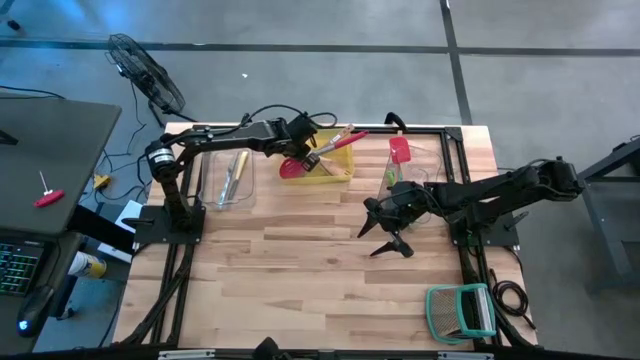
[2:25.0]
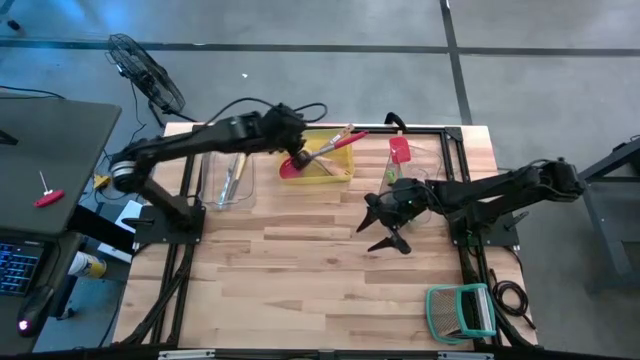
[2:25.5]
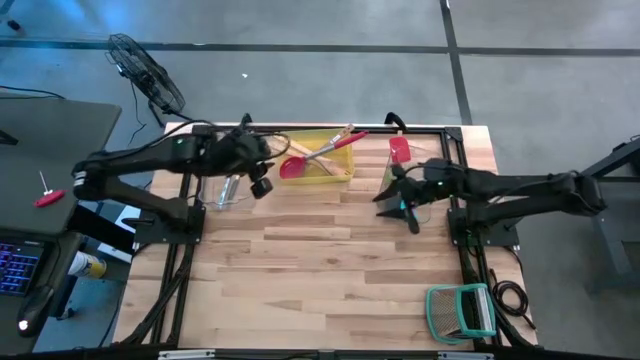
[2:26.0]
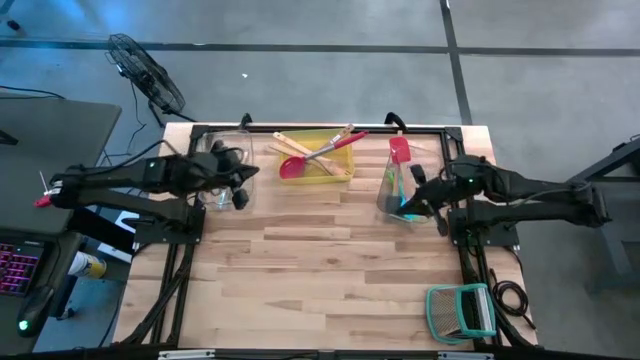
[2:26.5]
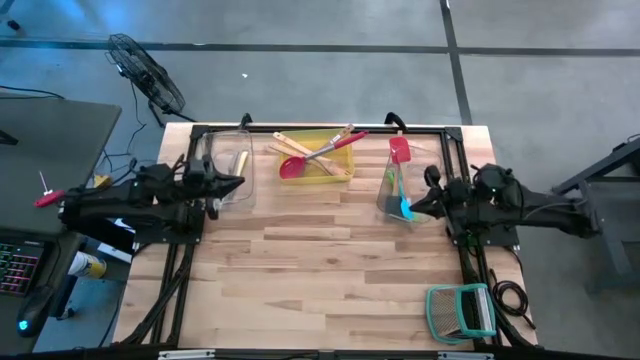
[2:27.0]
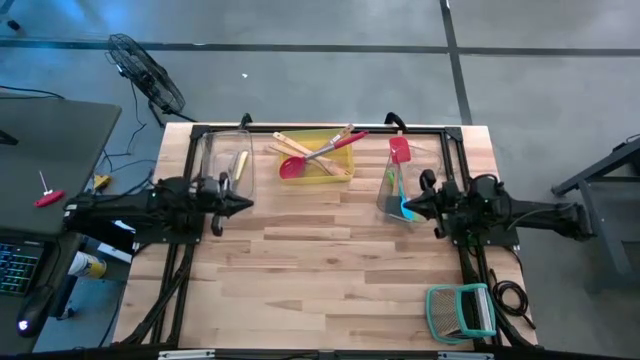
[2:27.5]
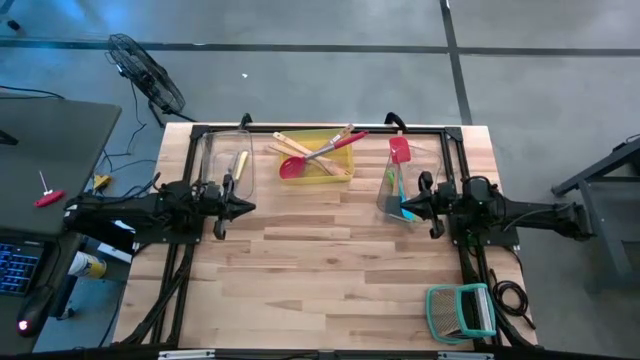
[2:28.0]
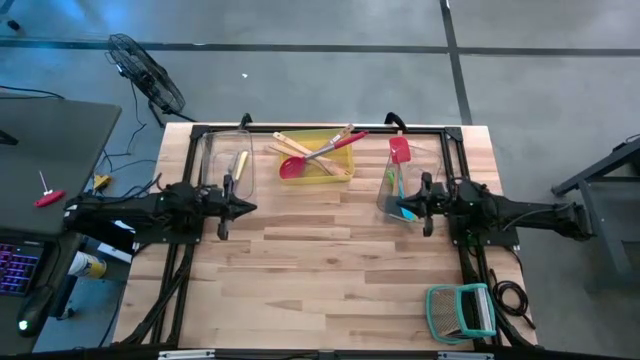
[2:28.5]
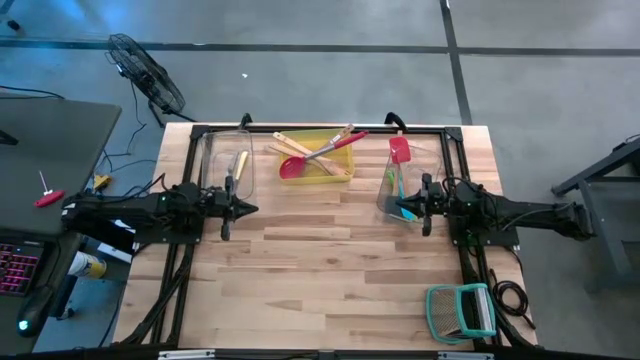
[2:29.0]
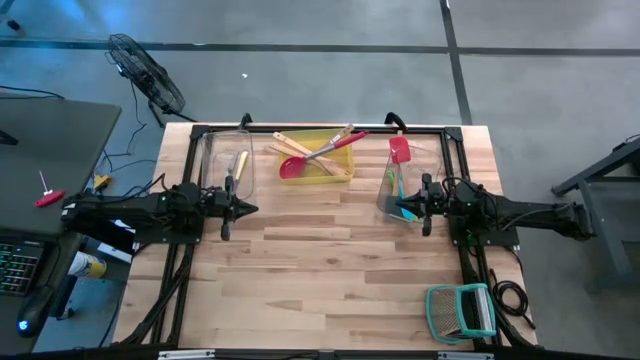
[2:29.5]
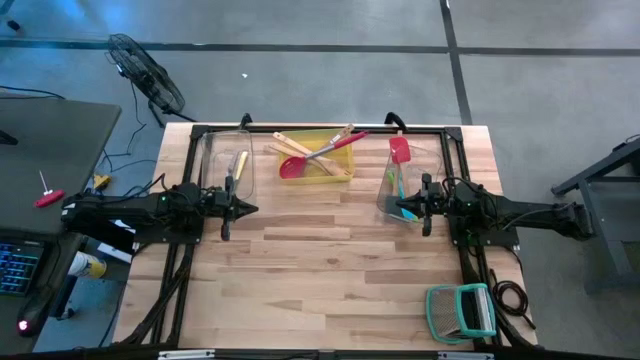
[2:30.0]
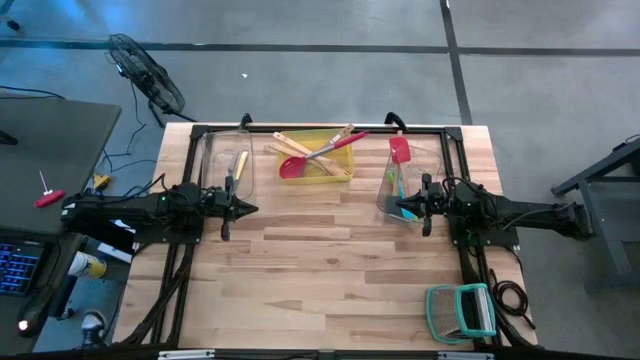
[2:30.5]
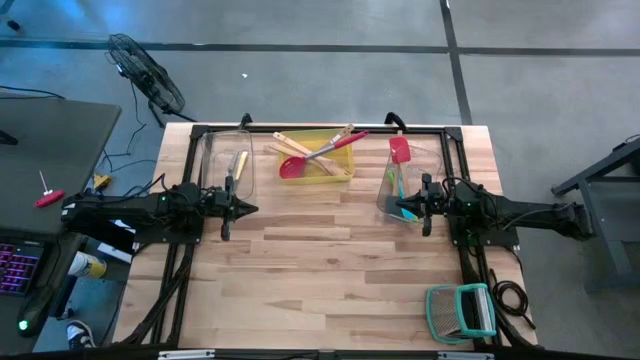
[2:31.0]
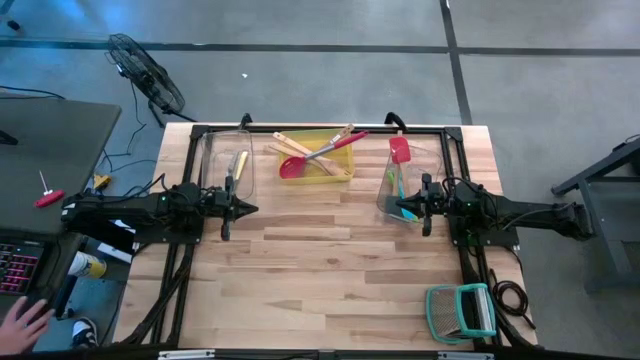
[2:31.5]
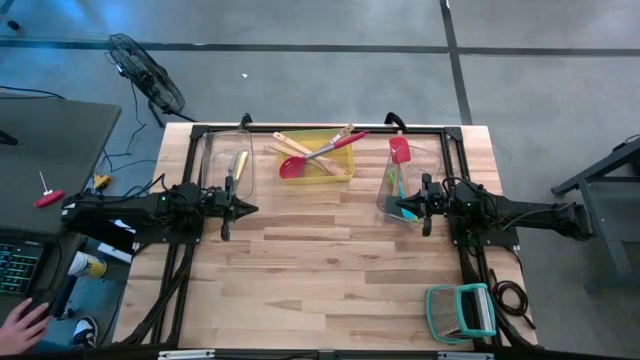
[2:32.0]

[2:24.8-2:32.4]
Task: Pick & Place Kitchen Items
Return to Home Position

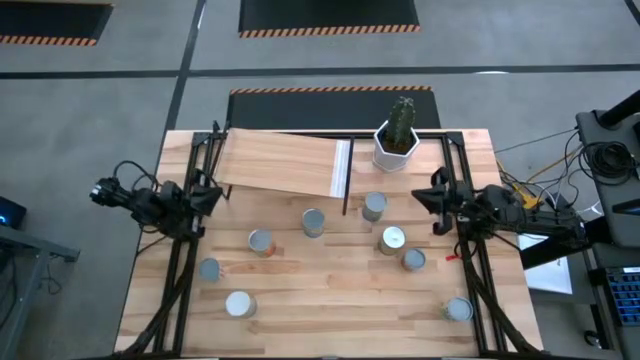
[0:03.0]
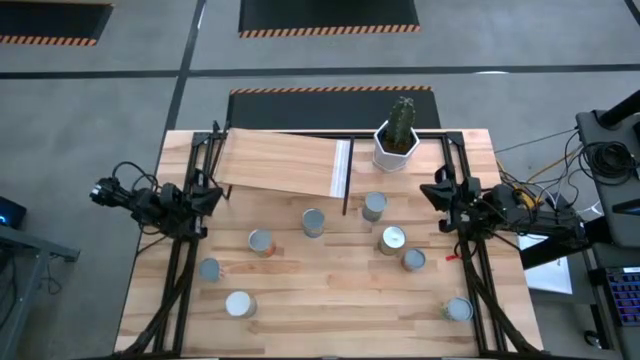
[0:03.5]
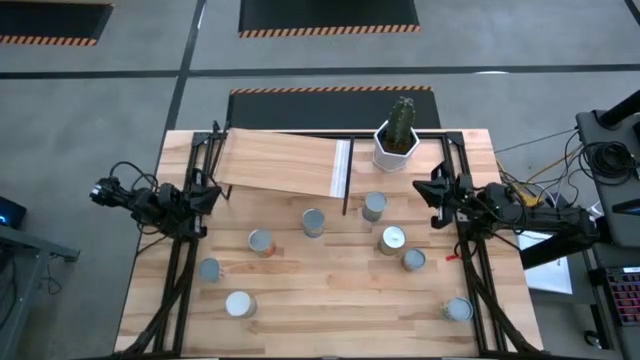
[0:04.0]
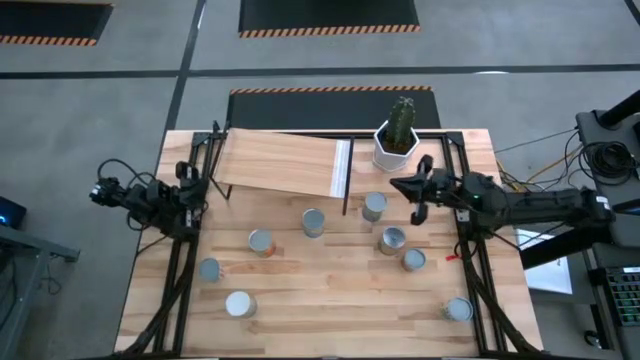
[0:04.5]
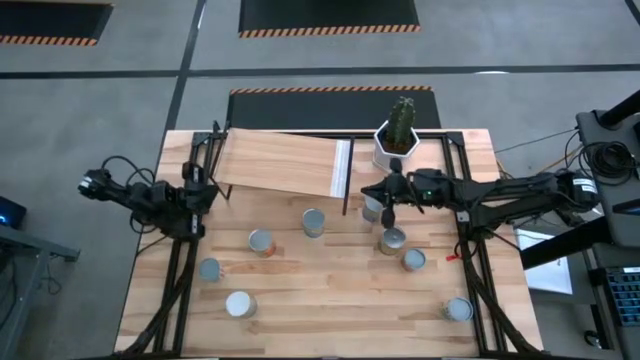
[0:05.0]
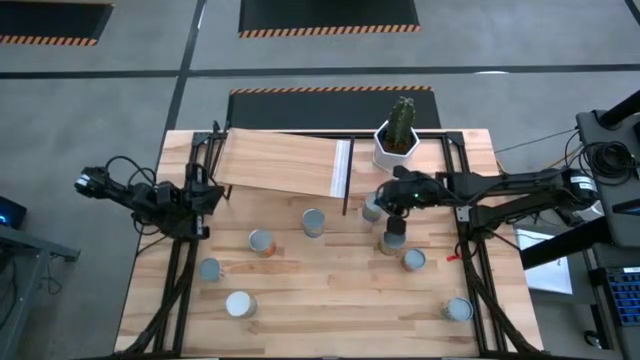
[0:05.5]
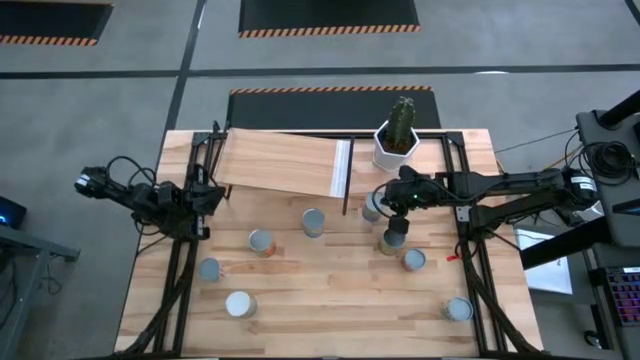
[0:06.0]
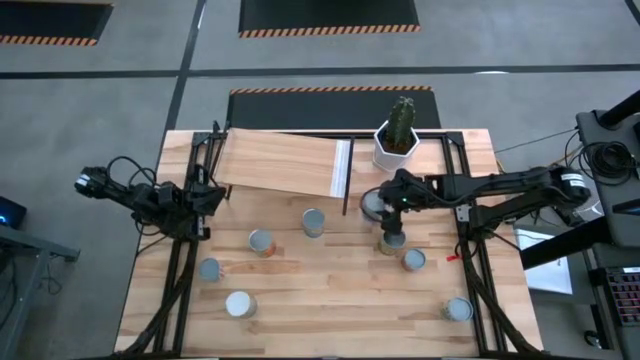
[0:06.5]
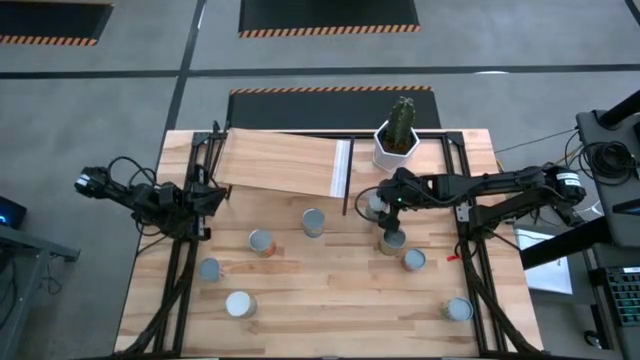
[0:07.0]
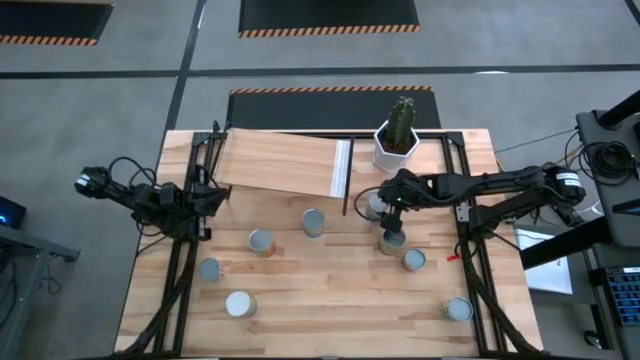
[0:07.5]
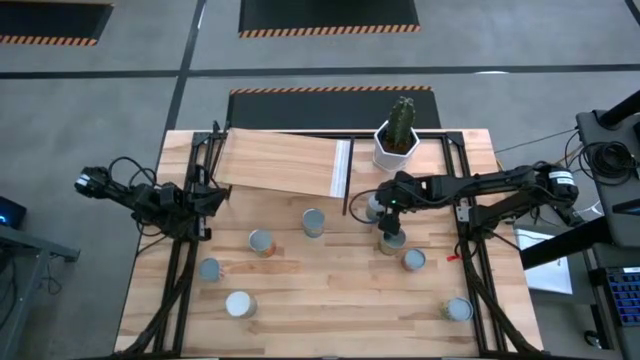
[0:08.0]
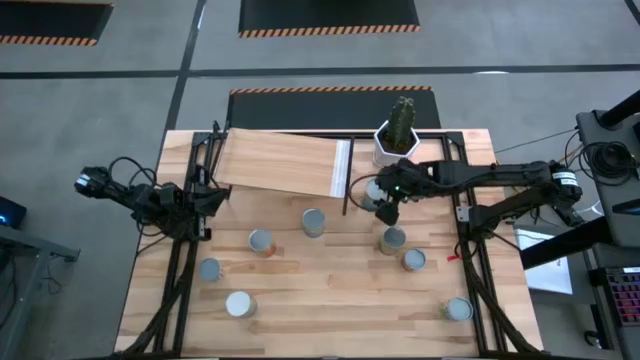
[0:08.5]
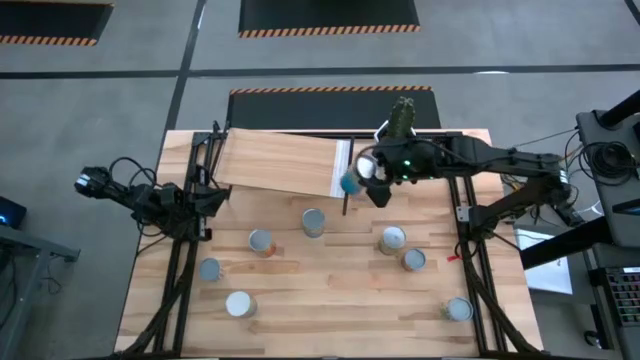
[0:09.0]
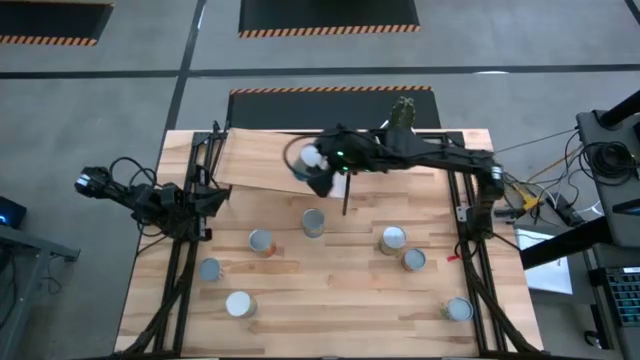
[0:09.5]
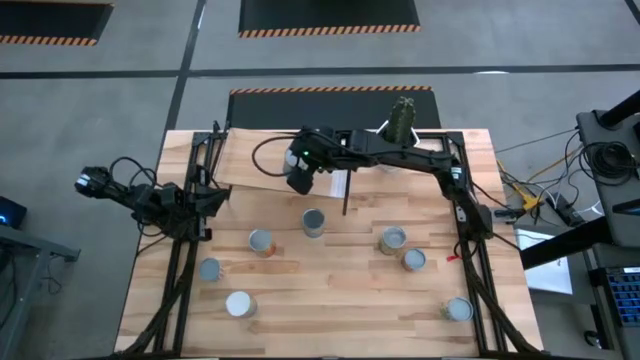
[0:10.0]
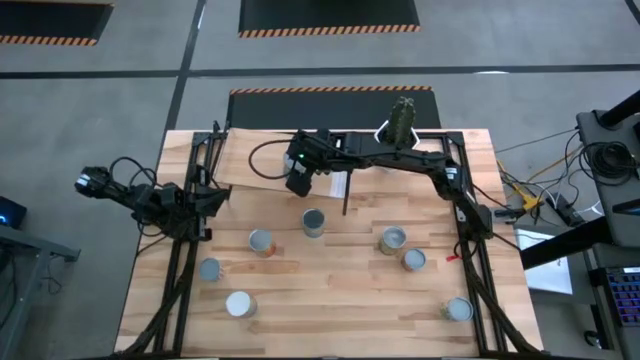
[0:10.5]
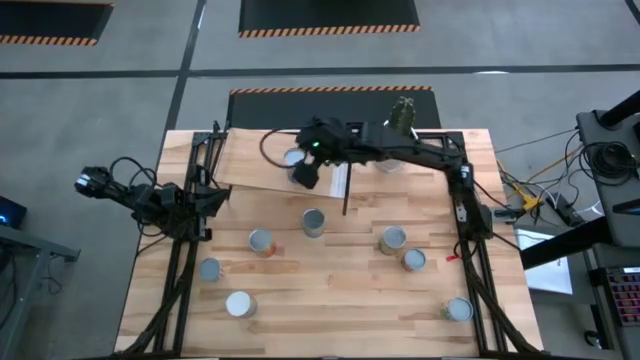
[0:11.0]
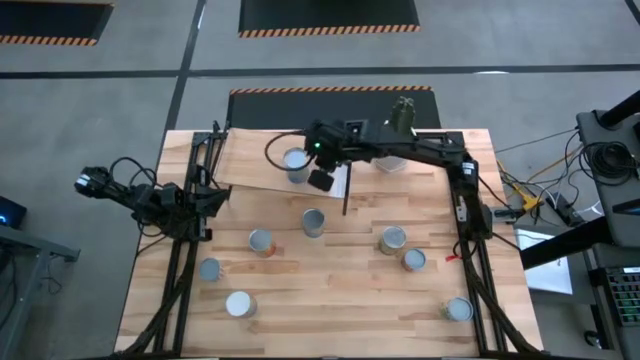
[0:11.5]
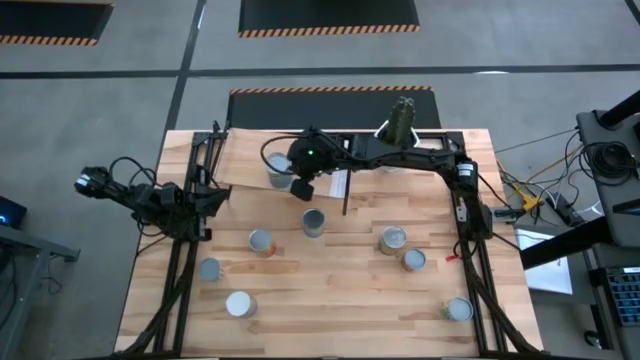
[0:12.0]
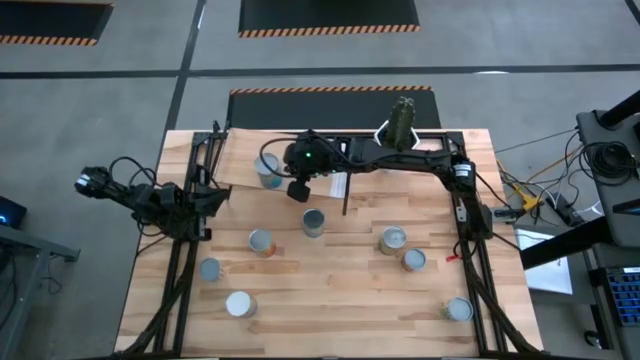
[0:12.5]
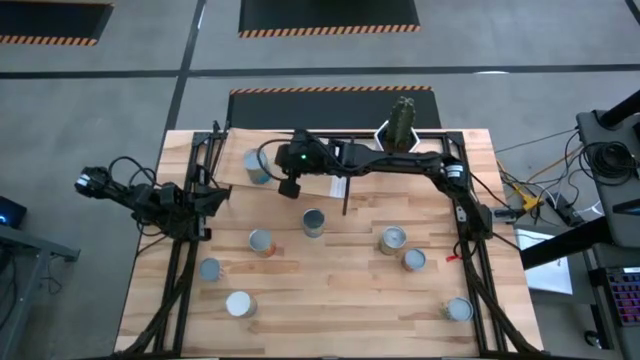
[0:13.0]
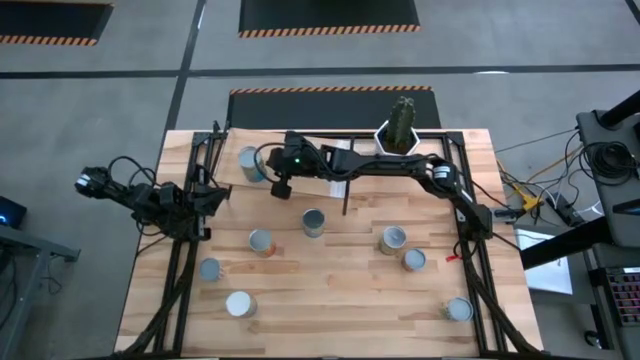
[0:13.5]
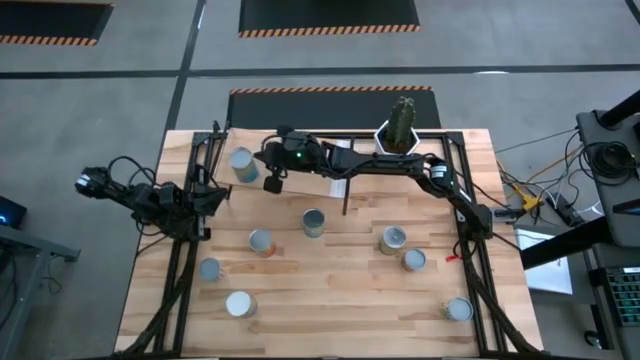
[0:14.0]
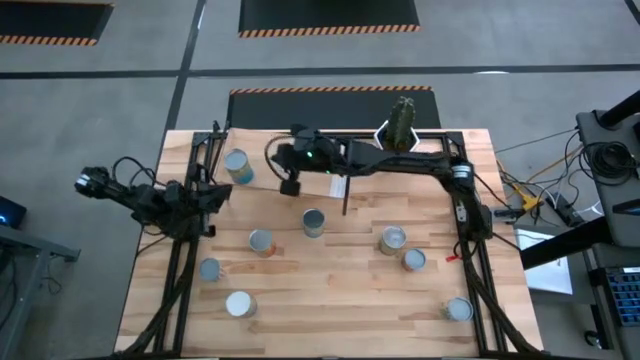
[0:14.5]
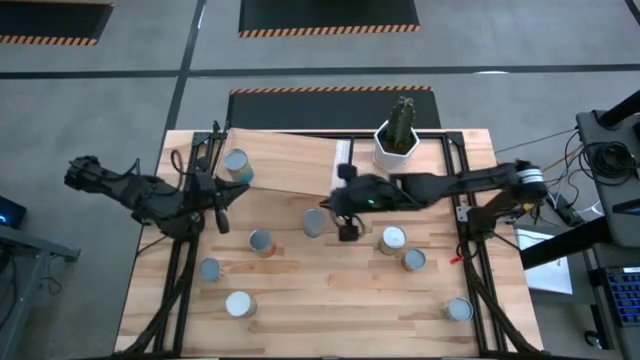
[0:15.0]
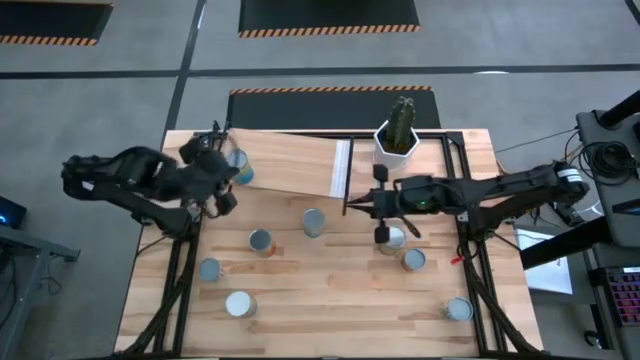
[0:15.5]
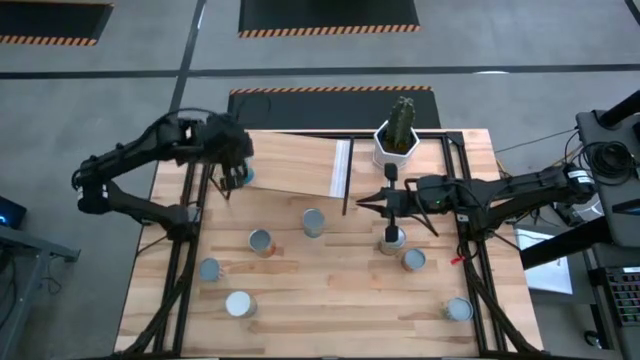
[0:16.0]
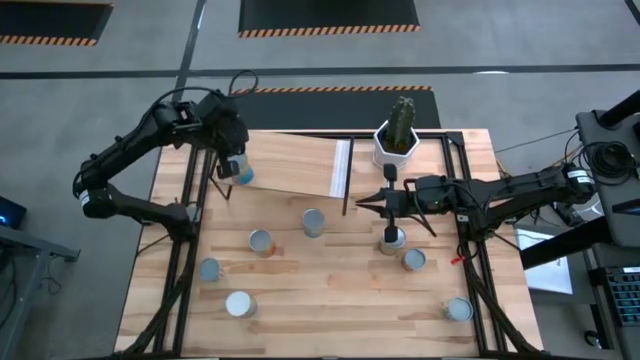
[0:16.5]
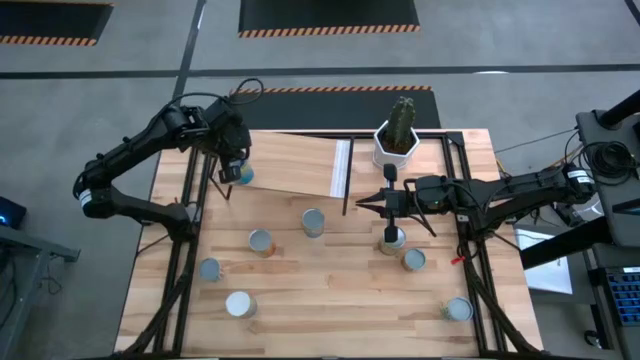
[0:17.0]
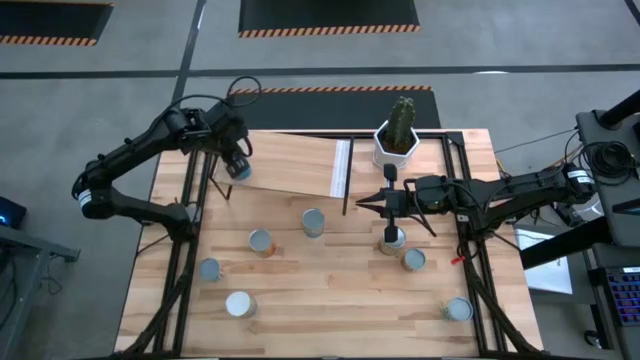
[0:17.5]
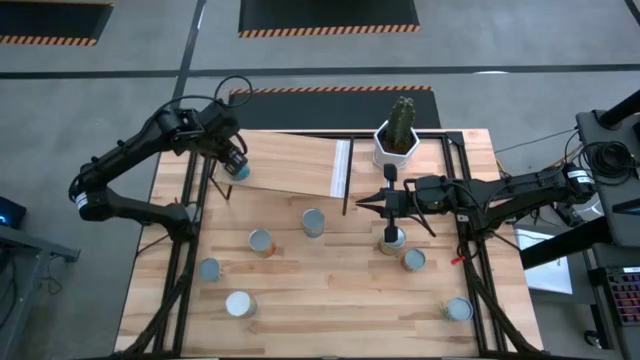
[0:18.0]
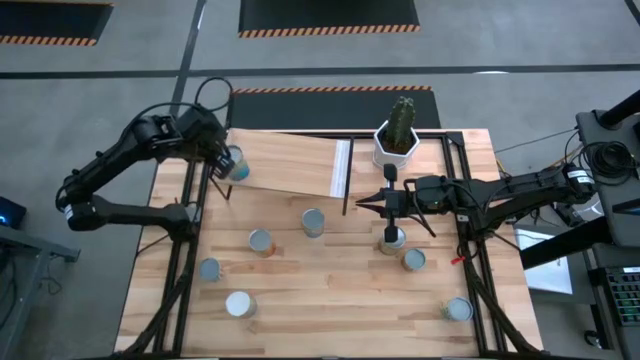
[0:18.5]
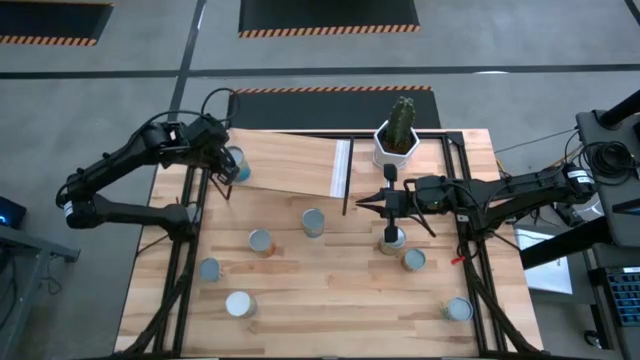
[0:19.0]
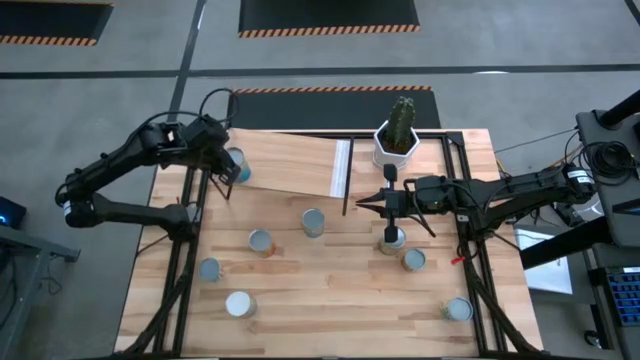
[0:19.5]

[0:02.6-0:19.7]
Task: Pick and place cans onto a shelf
Put the canned cherries on the shelf
